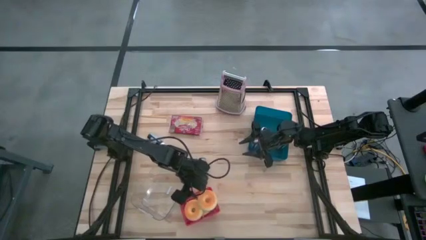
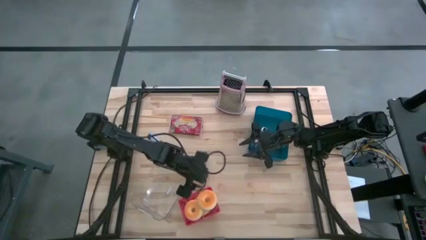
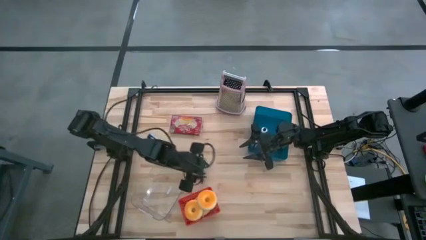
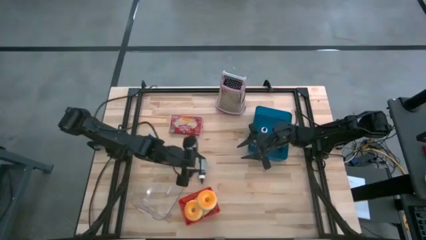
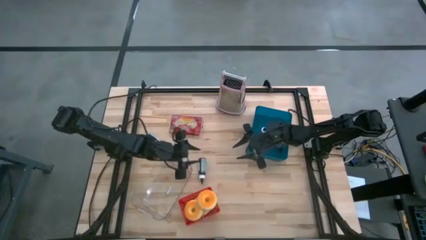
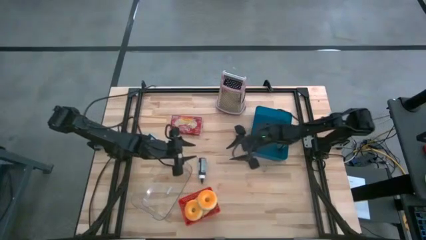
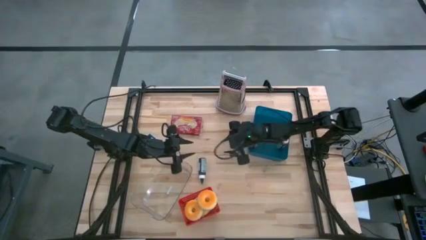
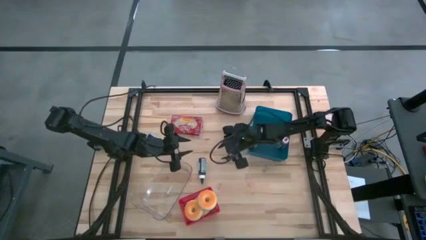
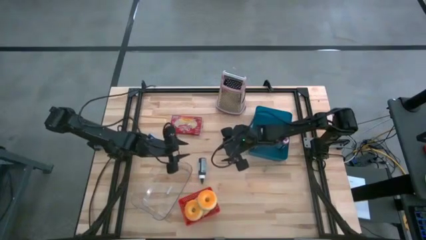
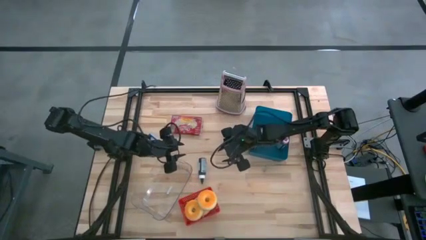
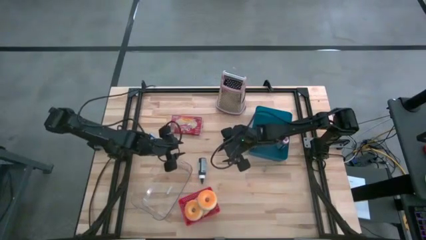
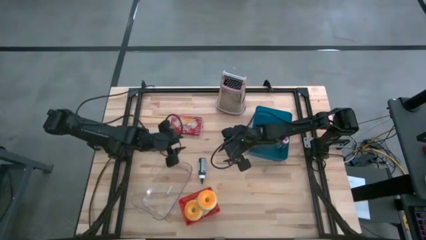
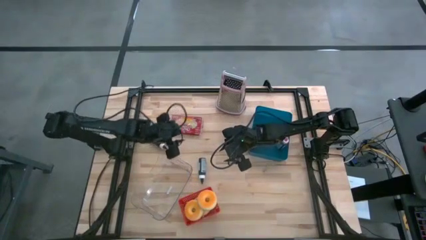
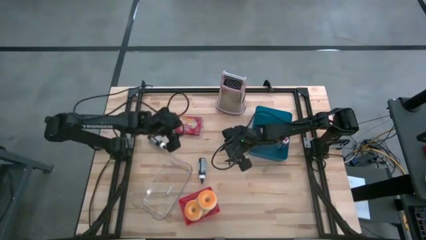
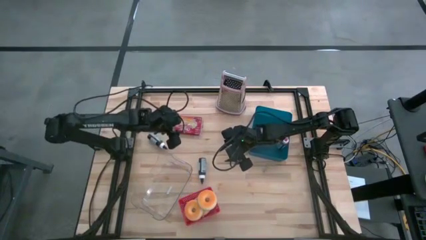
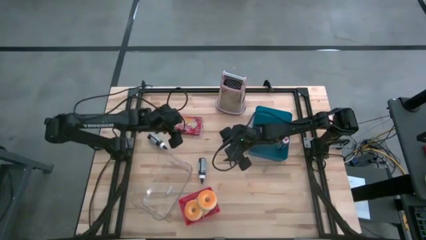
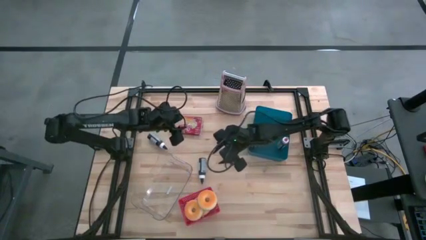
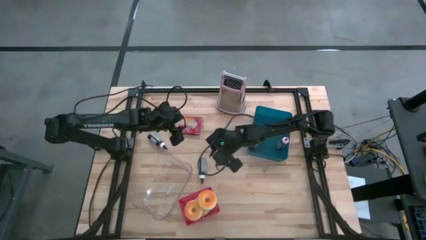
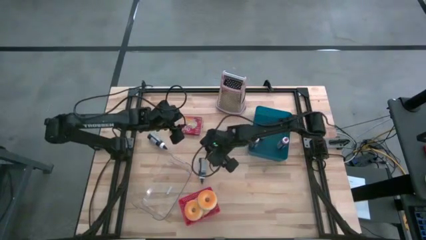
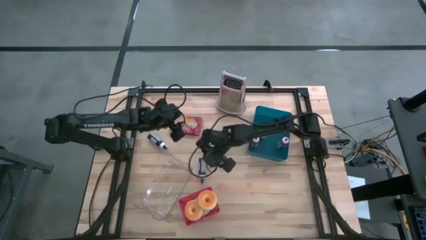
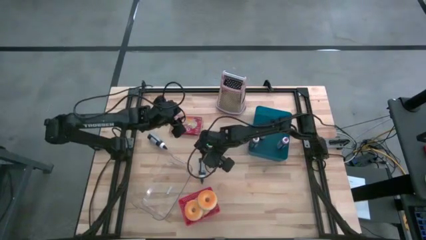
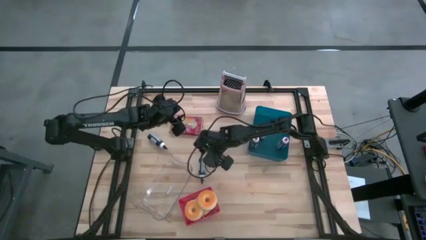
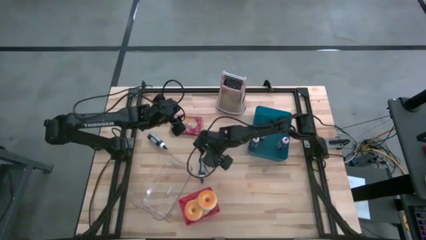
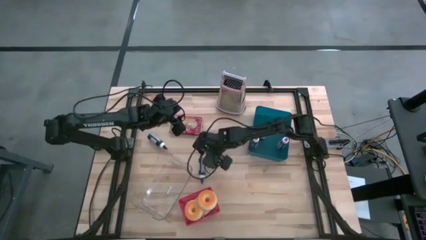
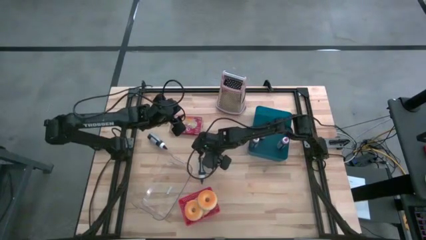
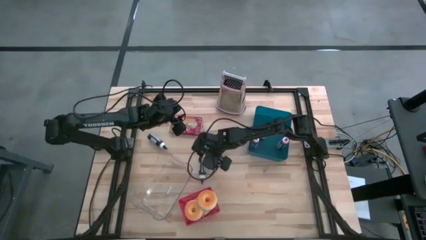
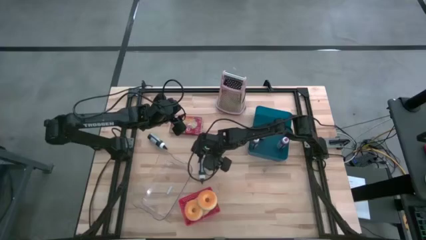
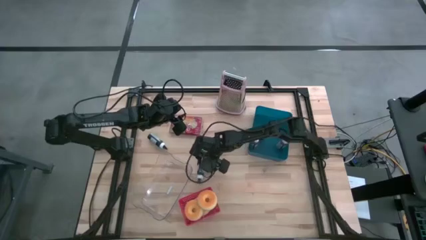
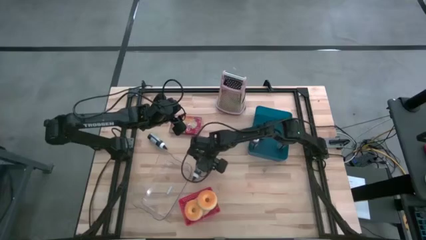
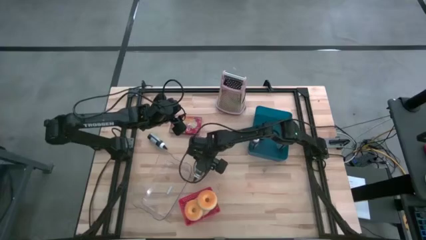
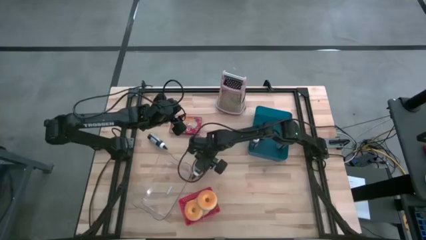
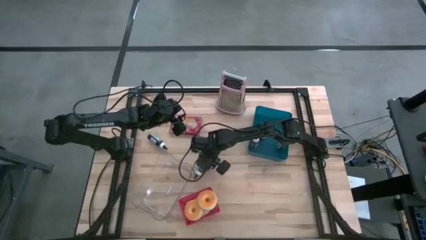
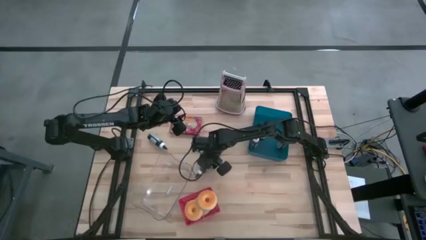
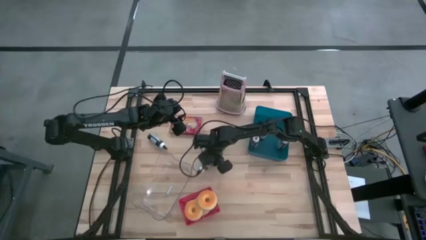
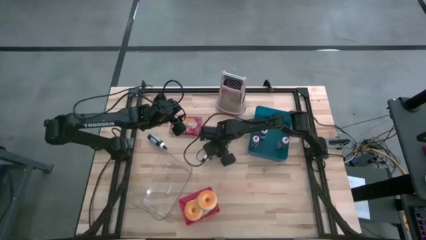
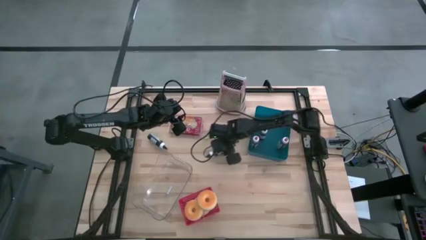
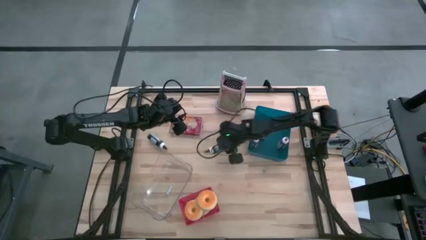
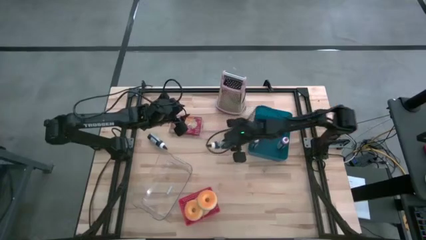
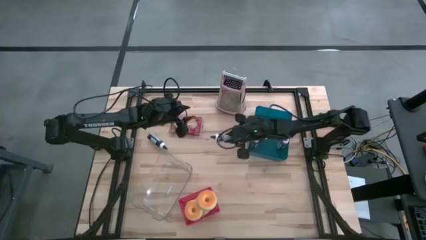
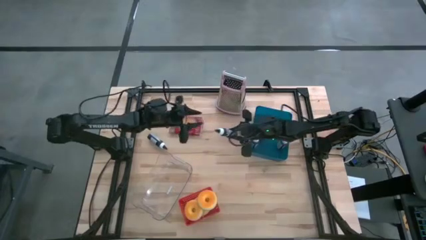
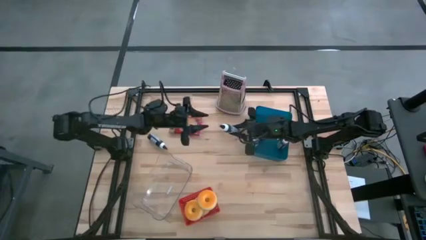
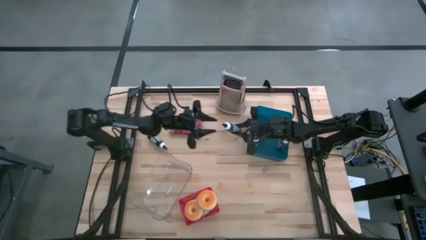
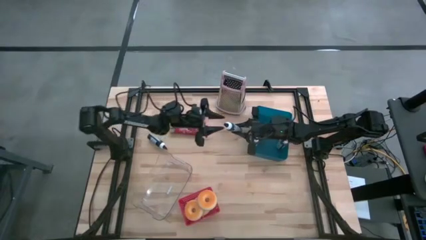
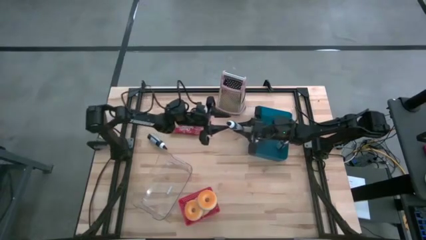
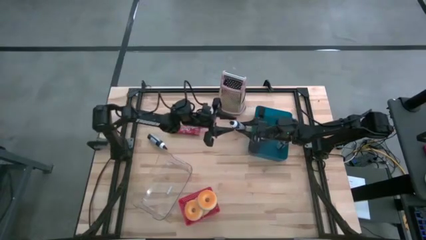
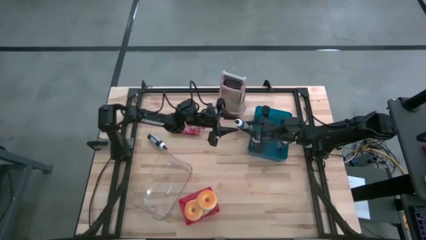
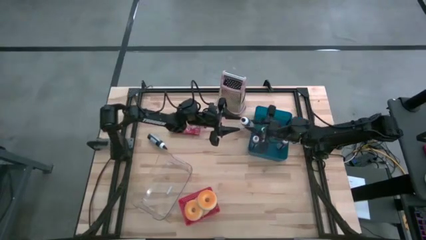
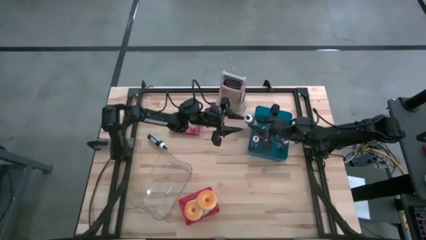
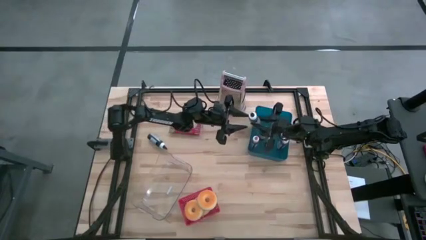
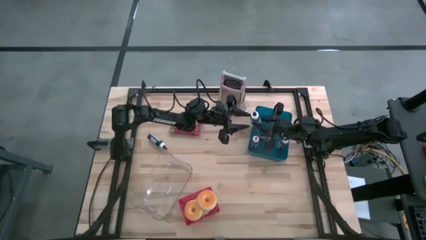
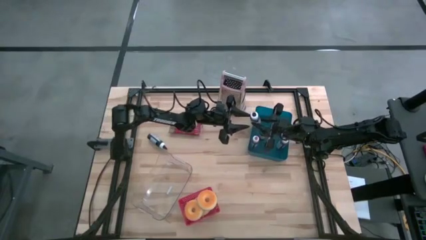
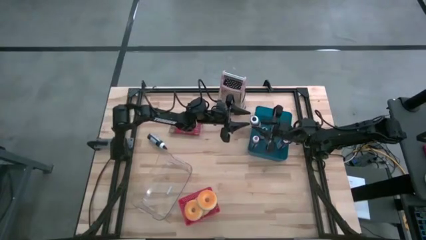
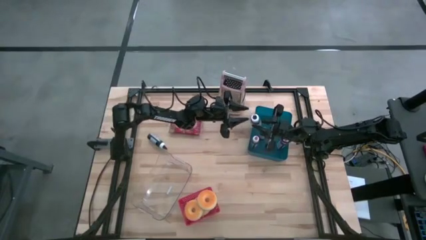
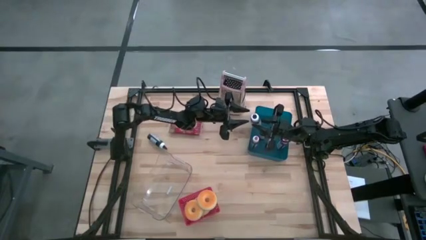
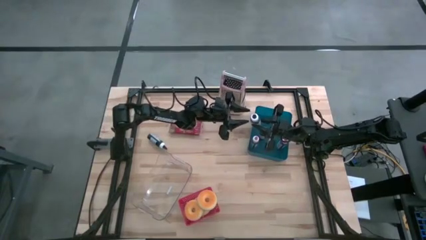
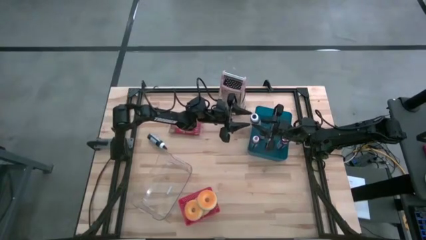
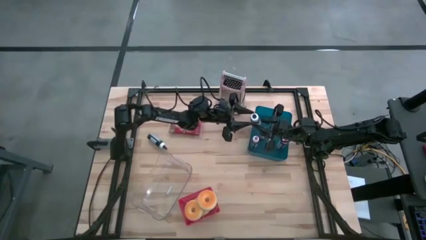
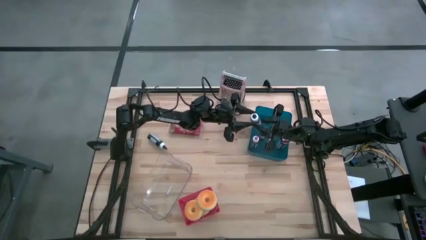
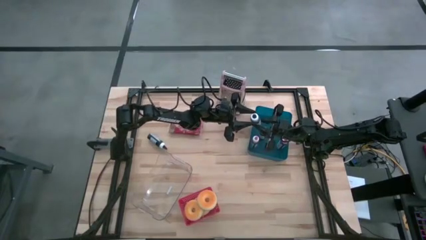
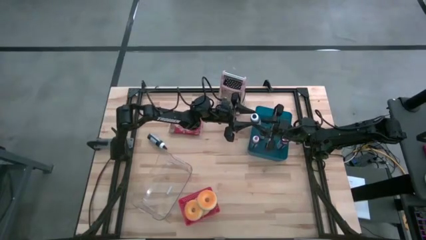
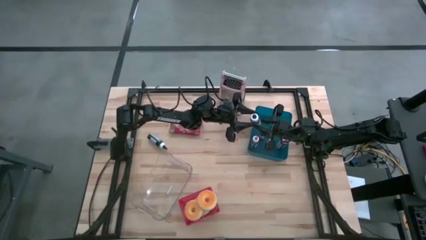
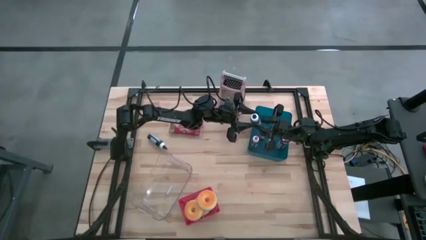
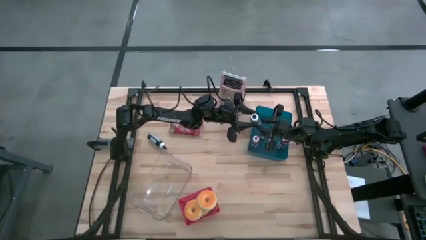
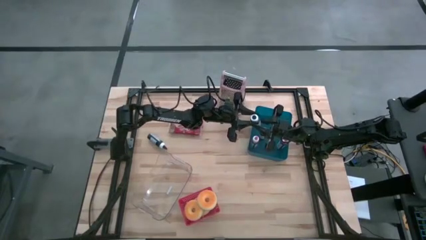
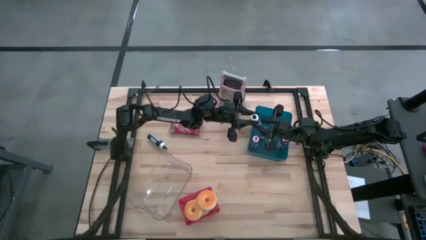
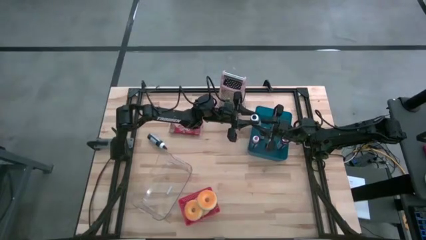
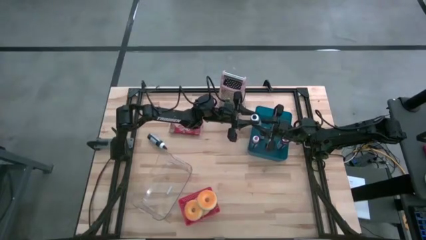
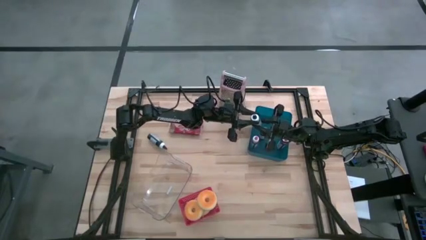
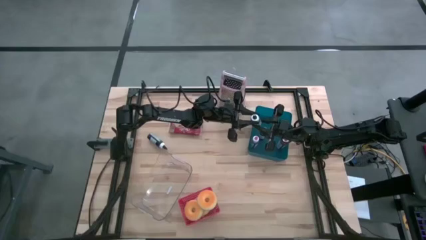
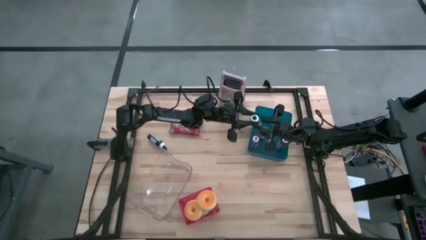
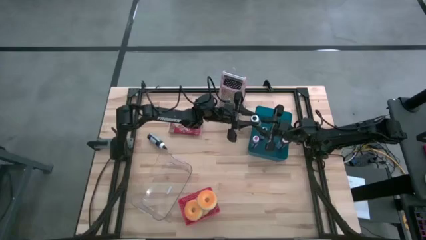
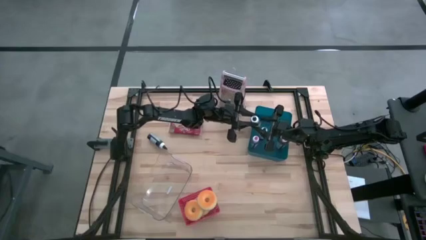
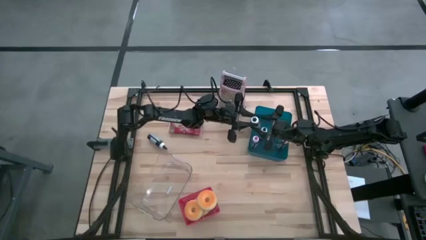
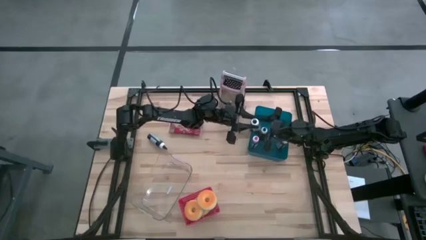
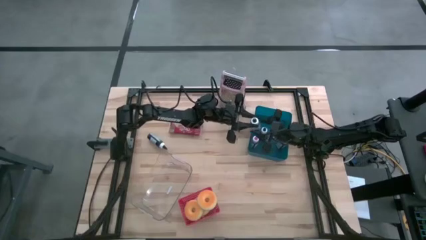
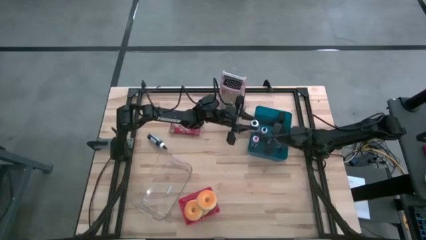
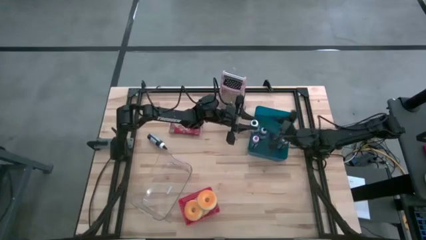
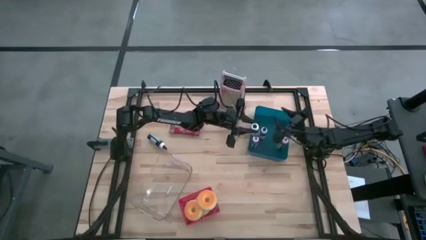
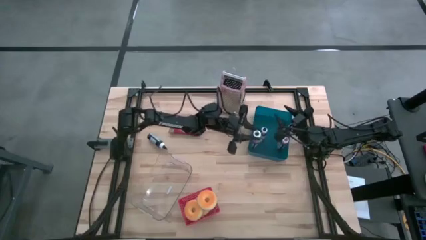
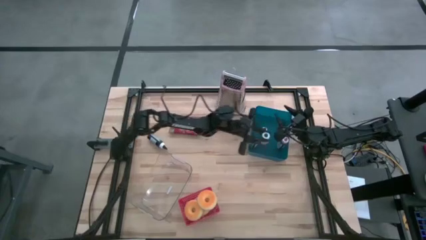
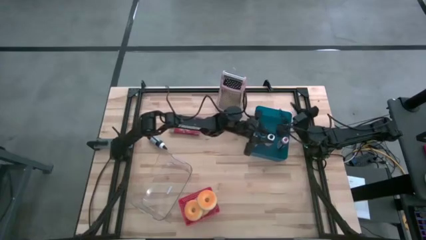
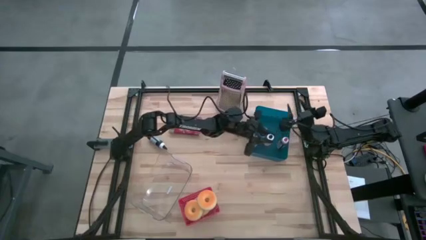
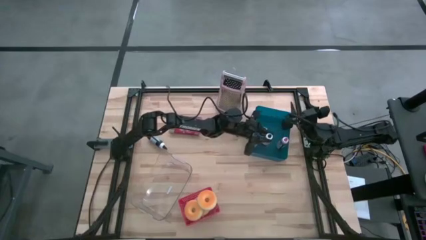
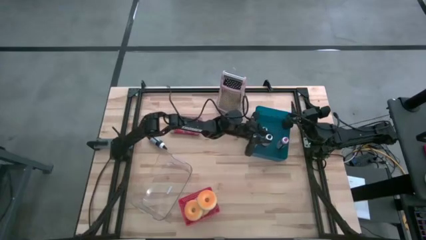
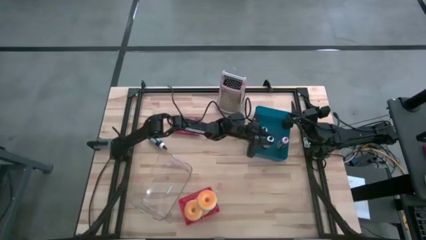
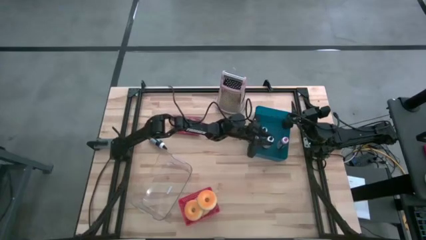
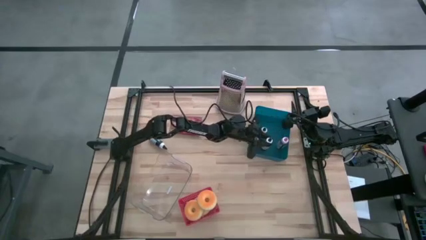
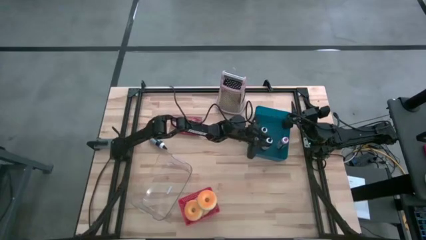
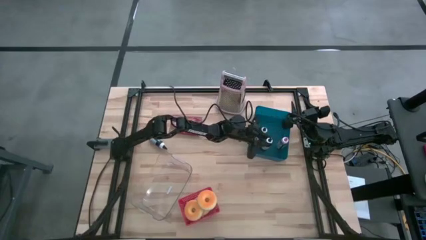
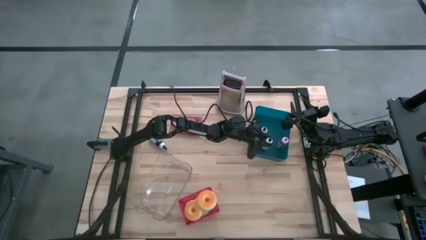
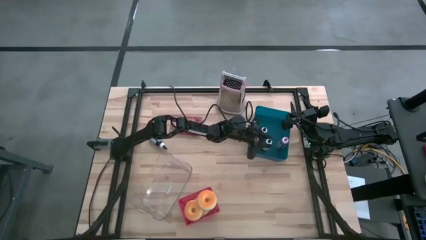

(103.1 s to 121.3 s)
Task: Pick & Place Food Item
Put the right black food coloring bottle into the blue bin
